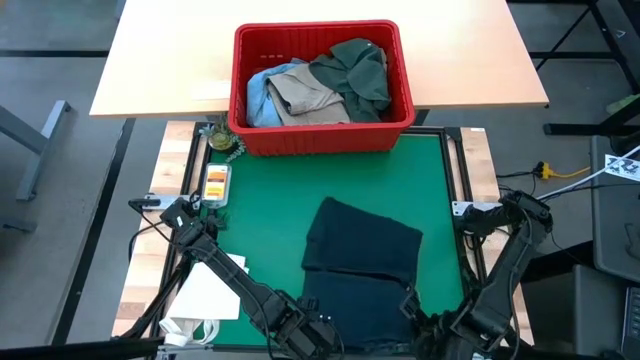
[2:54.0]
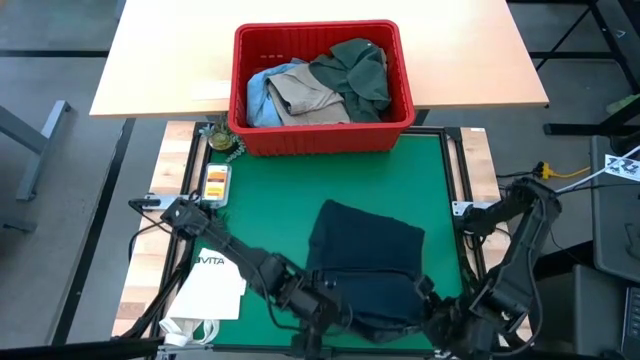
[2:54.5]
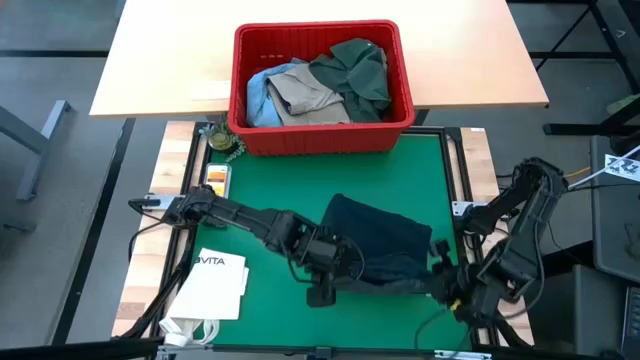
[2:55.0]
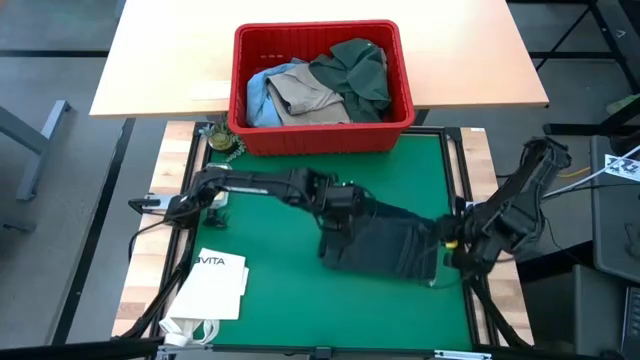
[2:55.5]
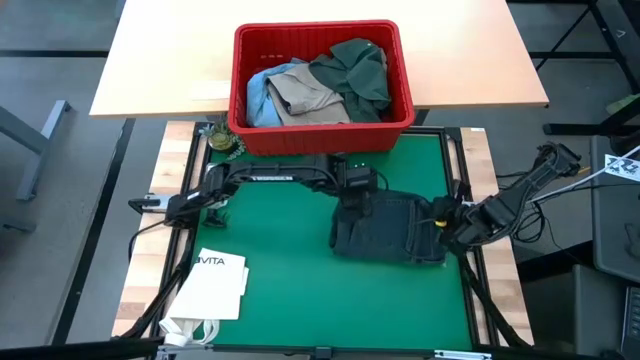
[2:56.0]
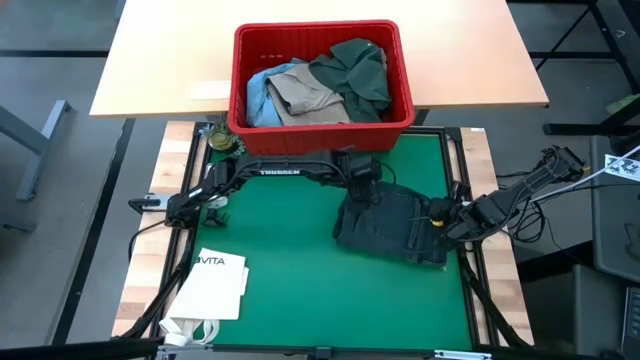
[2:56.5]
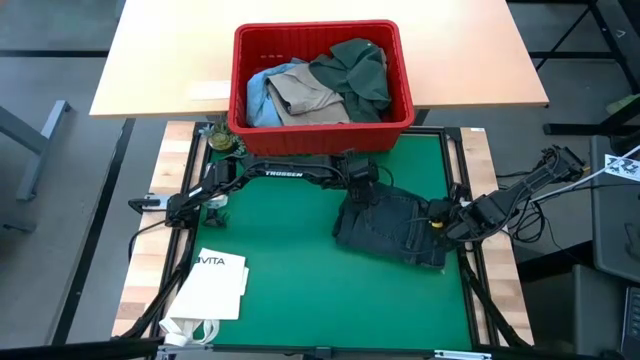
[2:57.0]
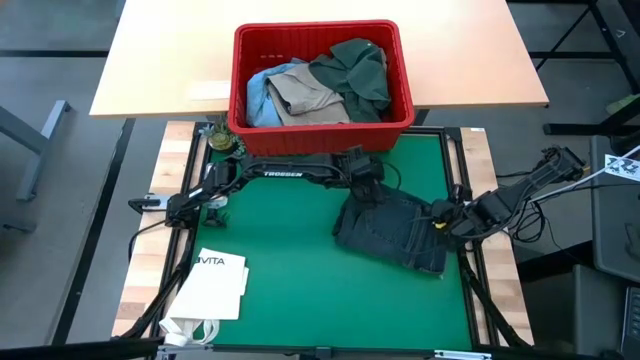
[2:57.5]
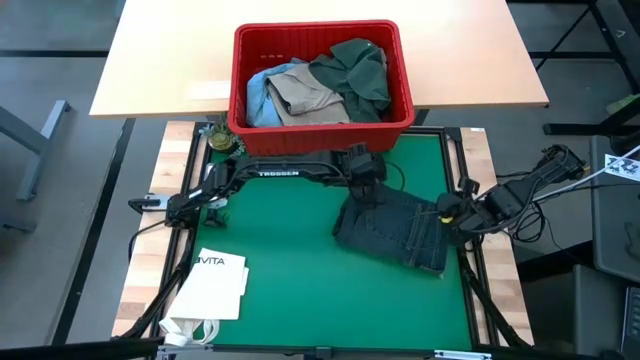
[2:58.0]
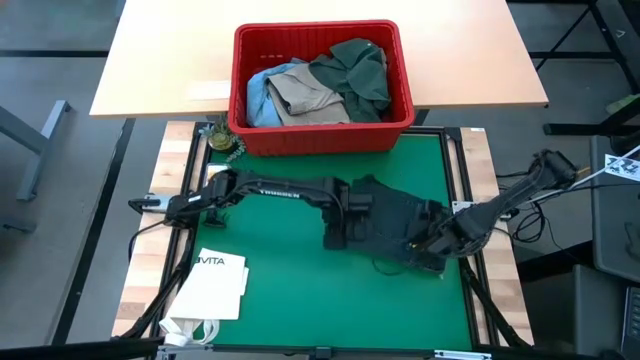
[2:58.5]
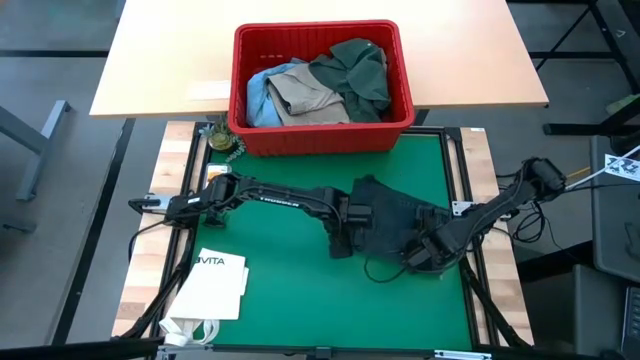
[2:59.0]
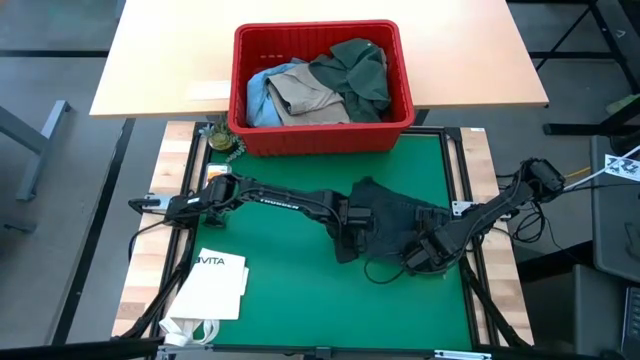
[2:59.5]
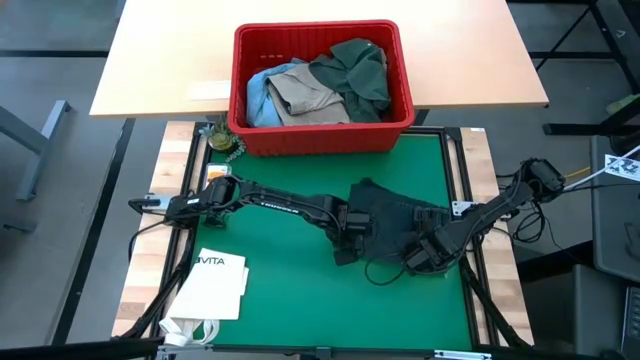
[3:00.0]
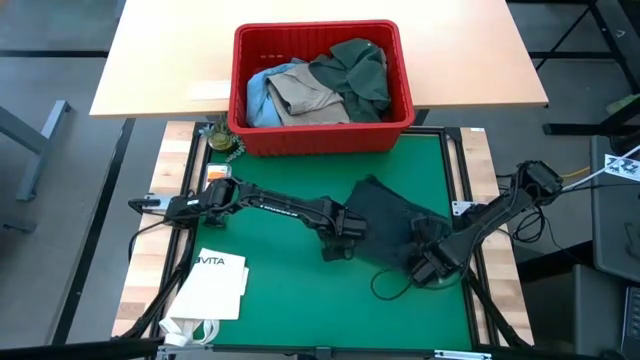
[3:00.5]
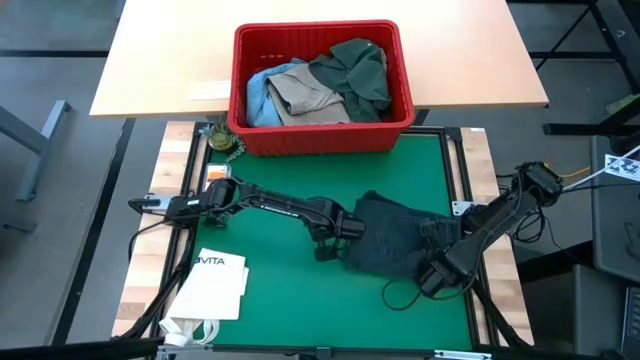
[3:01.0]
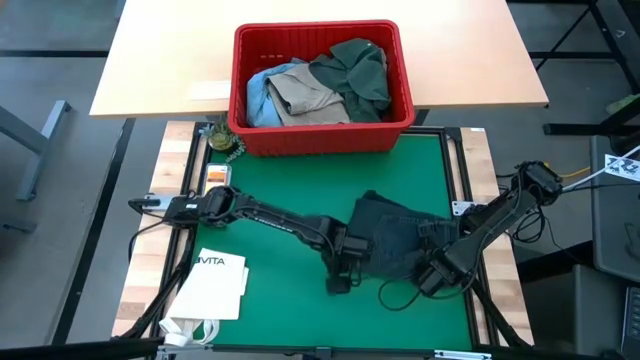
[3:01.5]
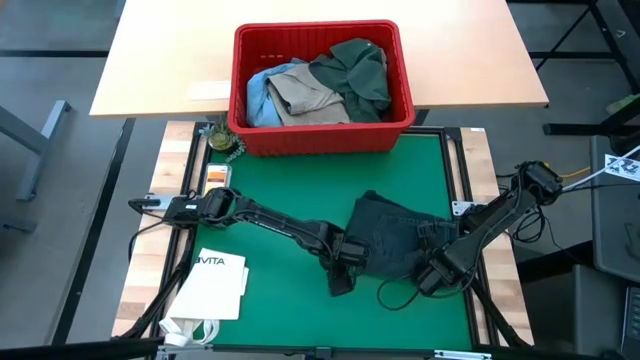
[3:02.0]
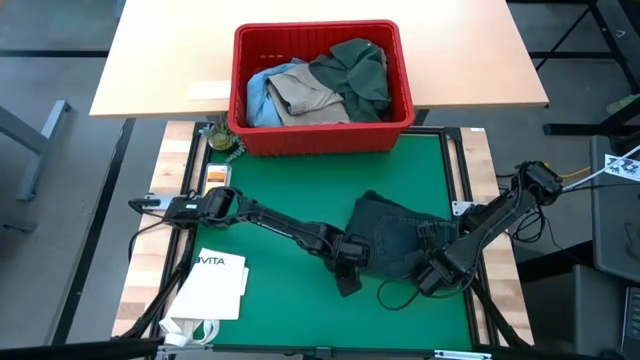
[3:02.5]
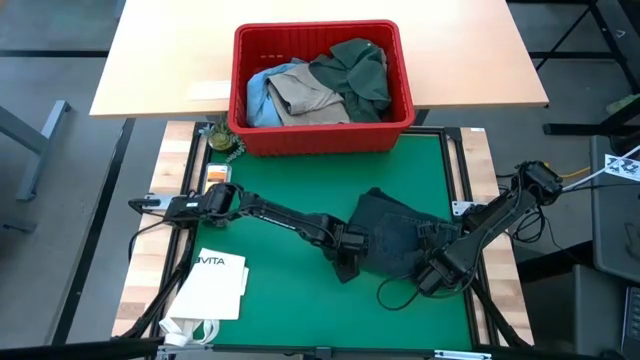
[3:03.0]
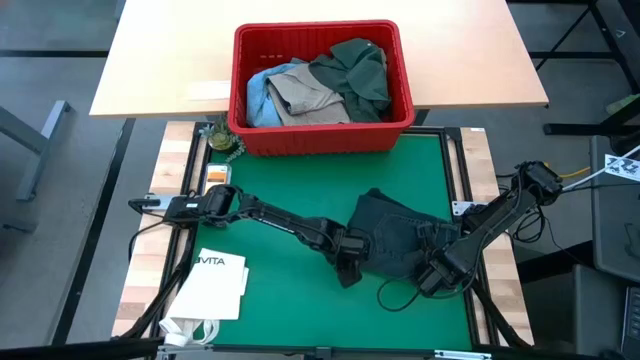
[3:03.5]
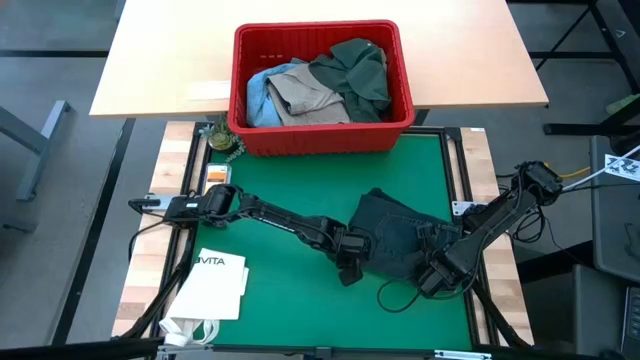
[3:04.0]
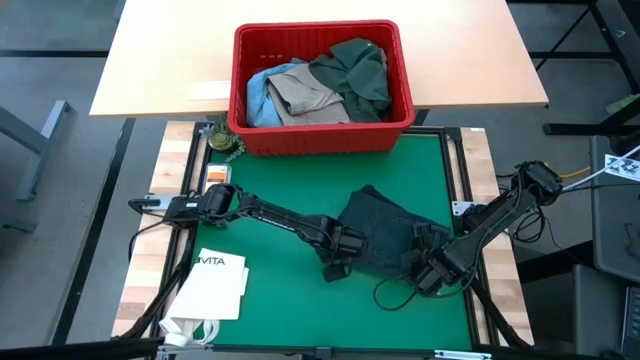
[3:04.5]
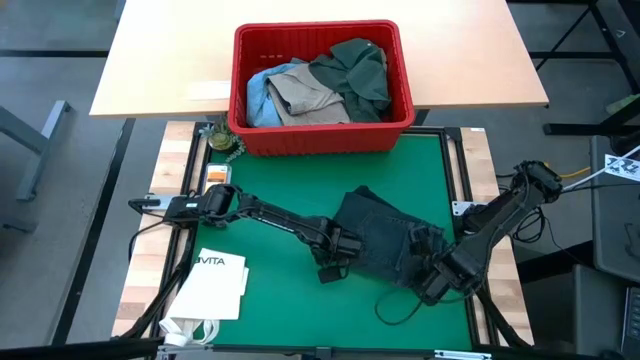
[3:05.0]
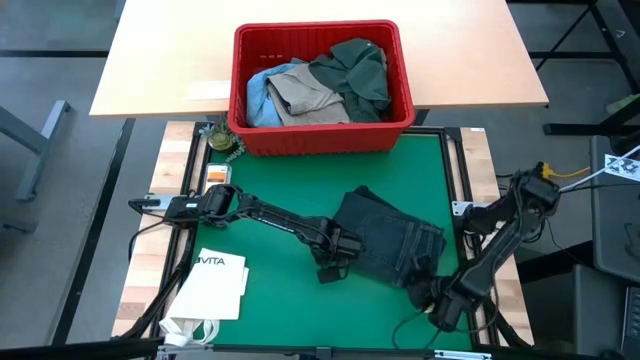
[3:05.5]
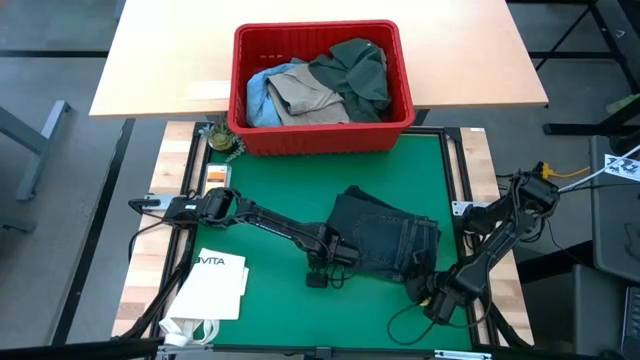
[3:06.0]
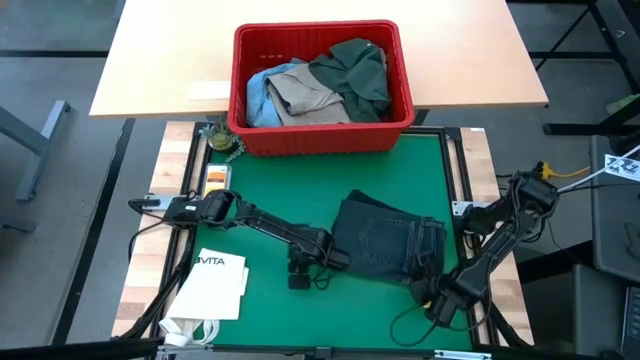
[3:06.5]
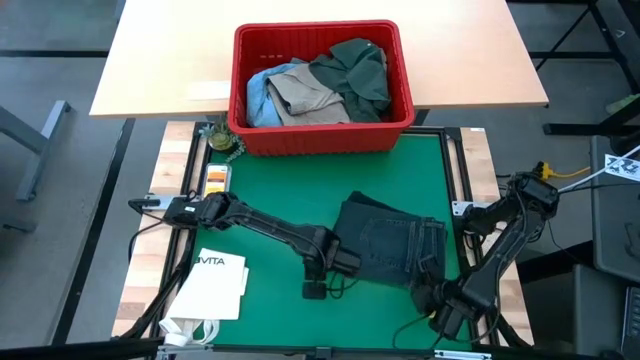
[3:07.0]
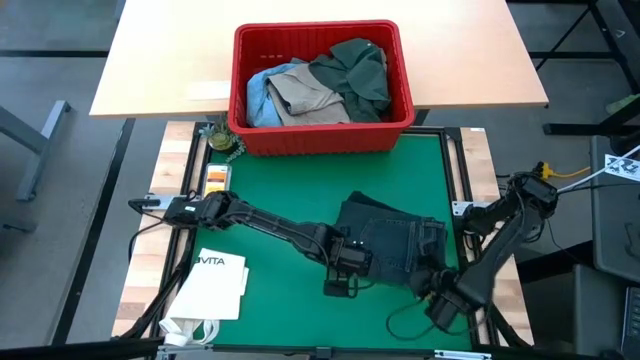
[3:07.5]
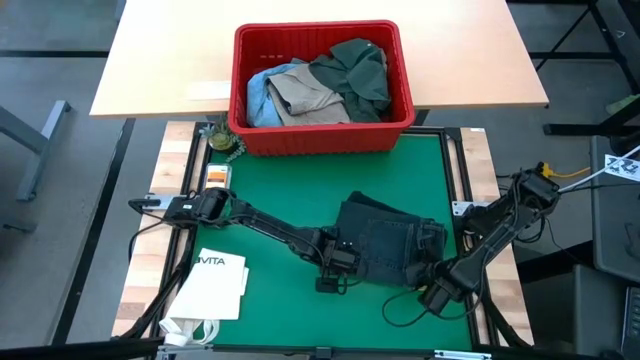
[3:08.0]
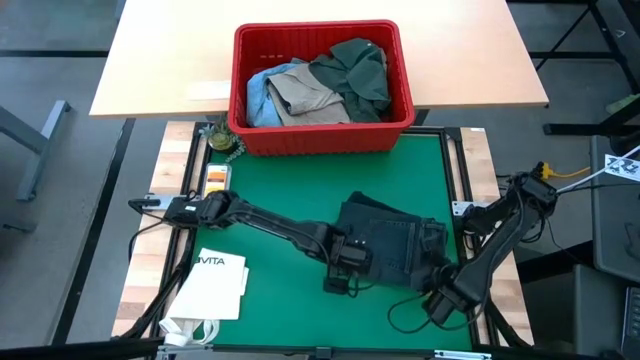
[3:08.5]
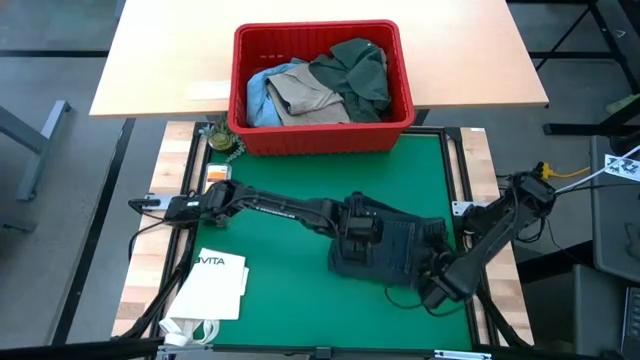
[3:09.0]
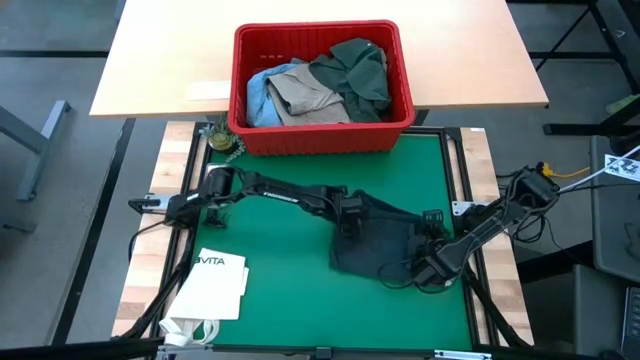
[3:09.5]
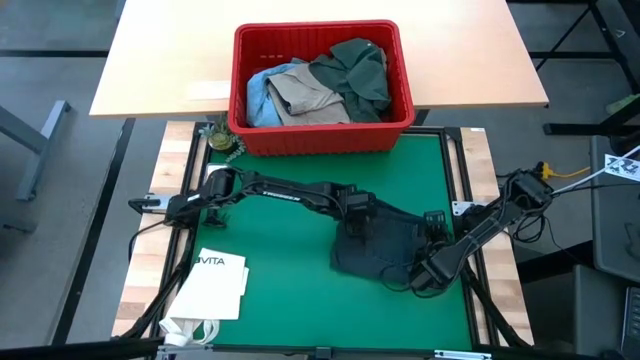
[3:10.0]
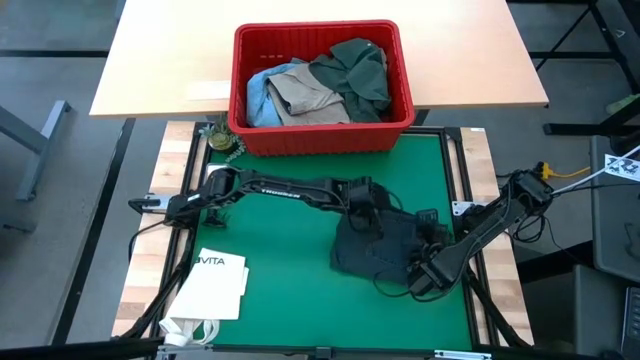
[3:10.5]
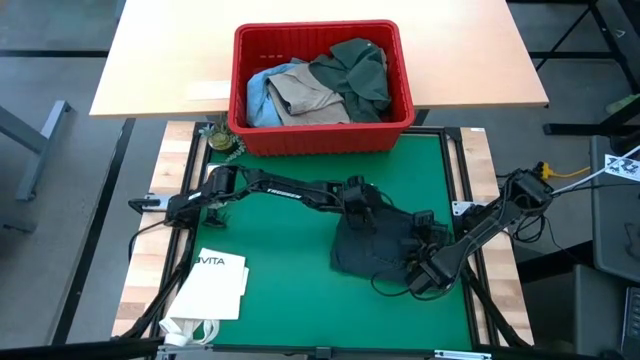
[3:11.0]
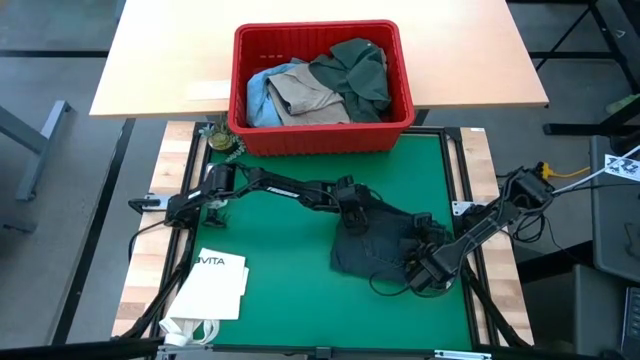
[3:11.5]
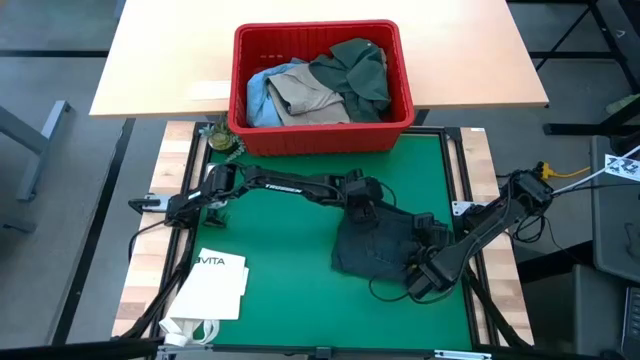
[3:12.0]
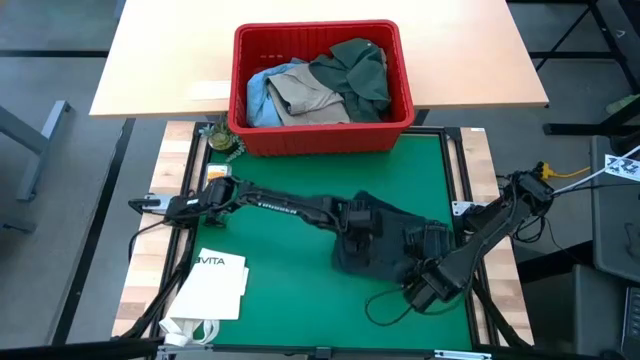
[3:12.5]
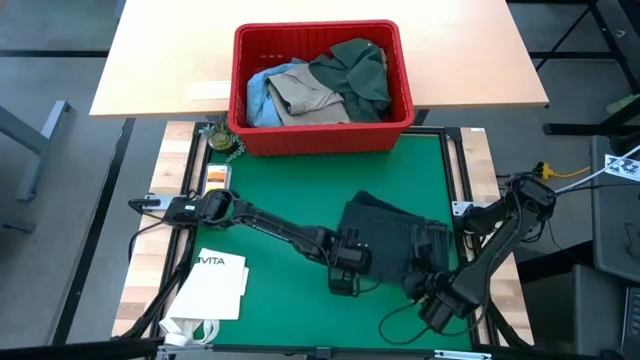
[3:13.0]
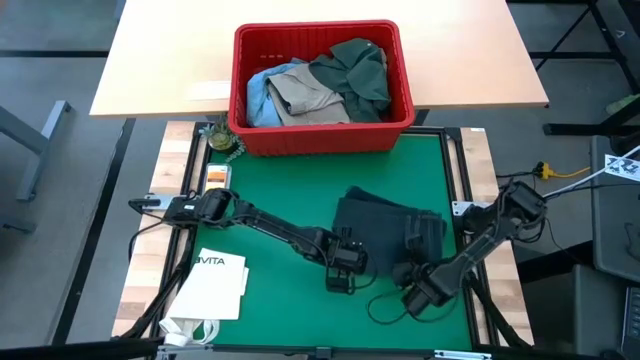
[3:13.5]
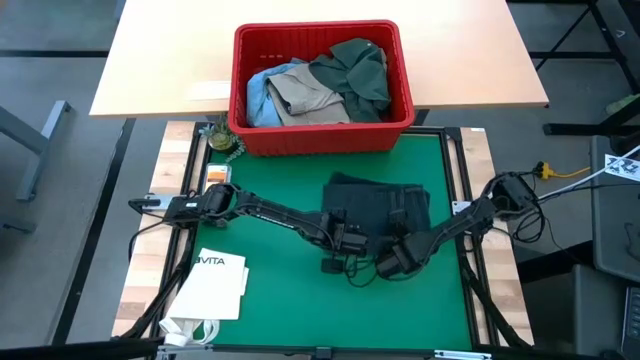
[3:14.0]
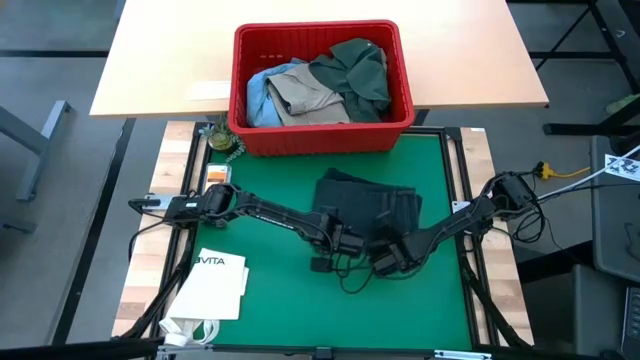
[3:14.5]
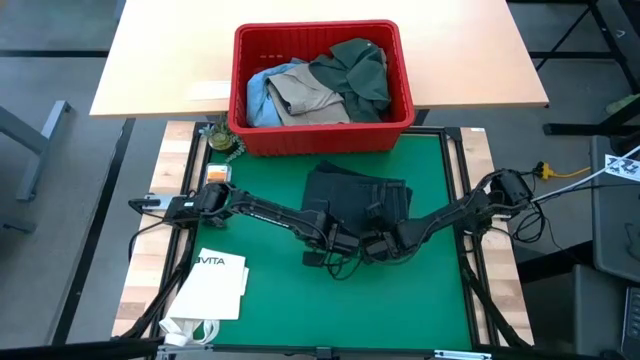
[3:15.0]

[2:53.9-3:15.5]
Task: Fold Laundry from Bin
Fold the dark blue pants
